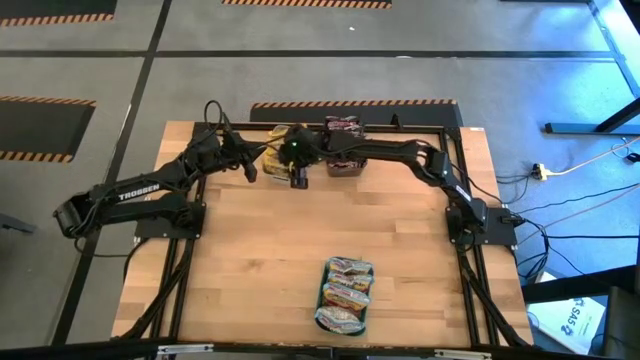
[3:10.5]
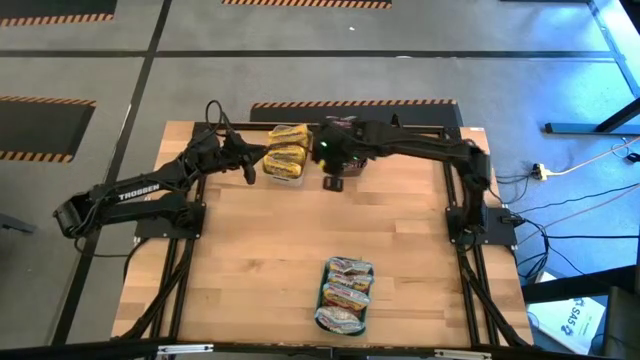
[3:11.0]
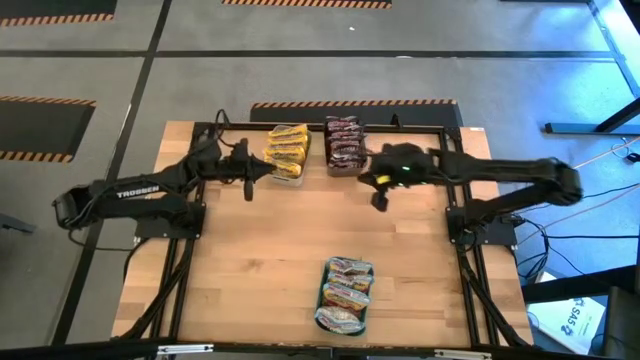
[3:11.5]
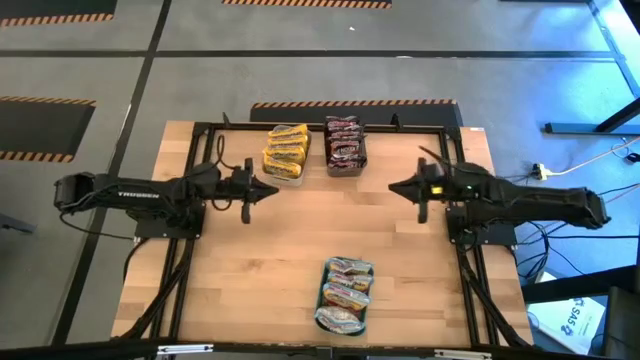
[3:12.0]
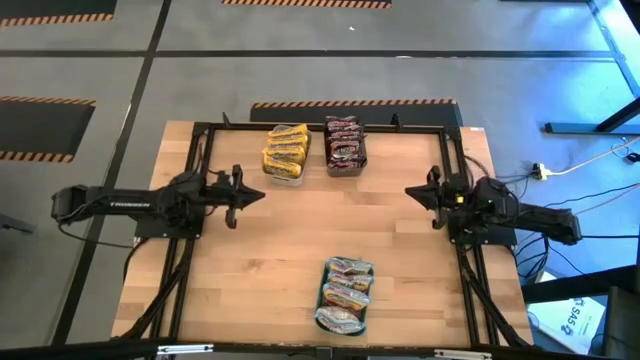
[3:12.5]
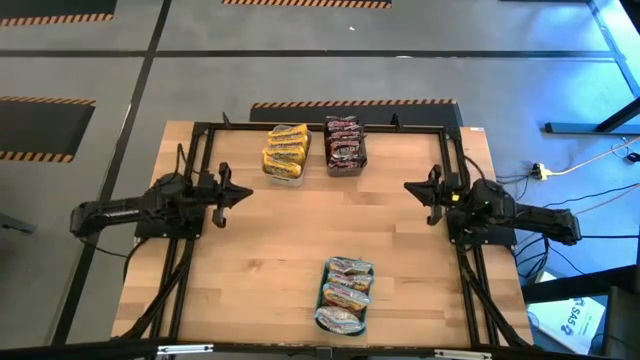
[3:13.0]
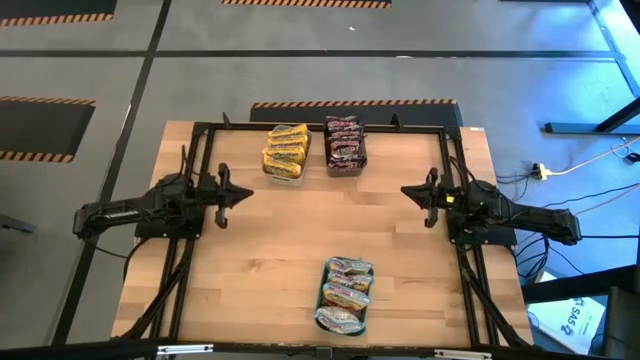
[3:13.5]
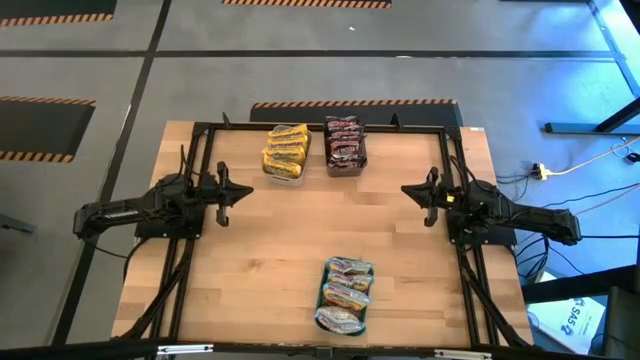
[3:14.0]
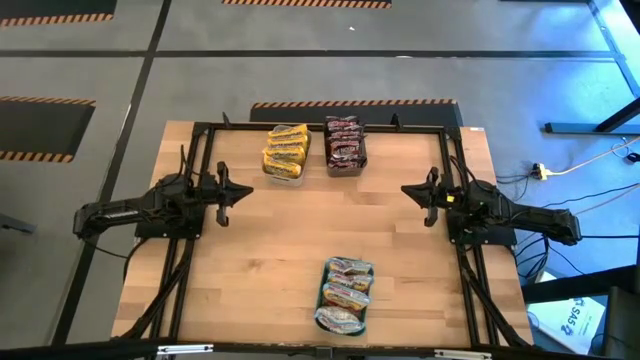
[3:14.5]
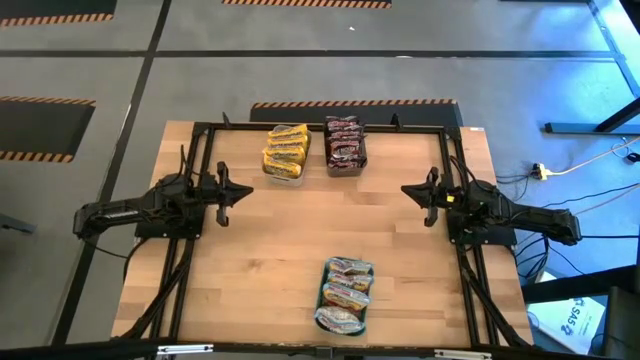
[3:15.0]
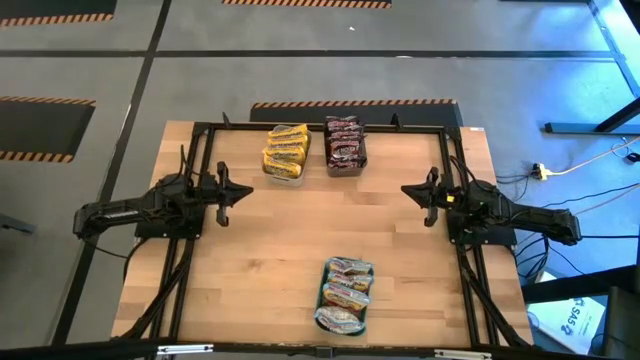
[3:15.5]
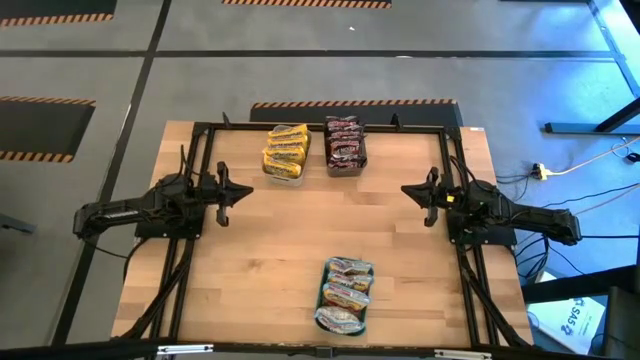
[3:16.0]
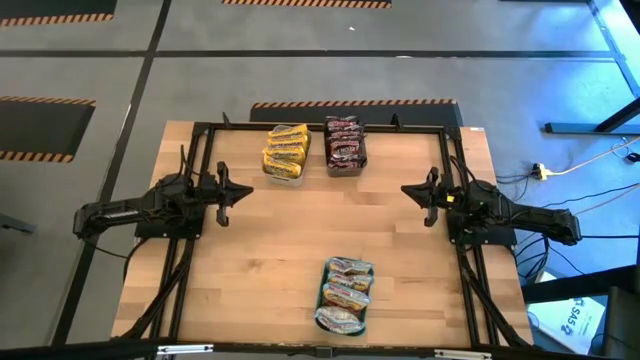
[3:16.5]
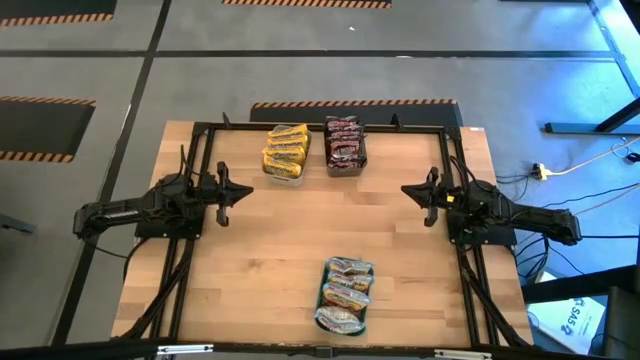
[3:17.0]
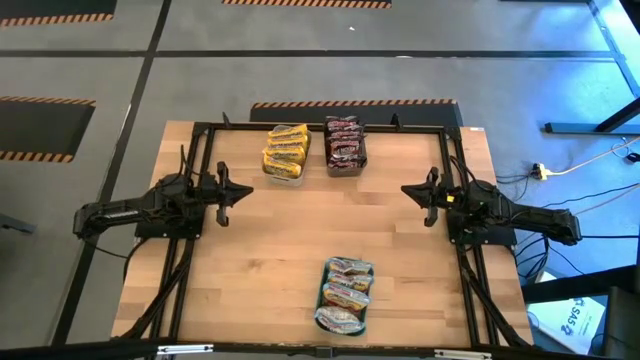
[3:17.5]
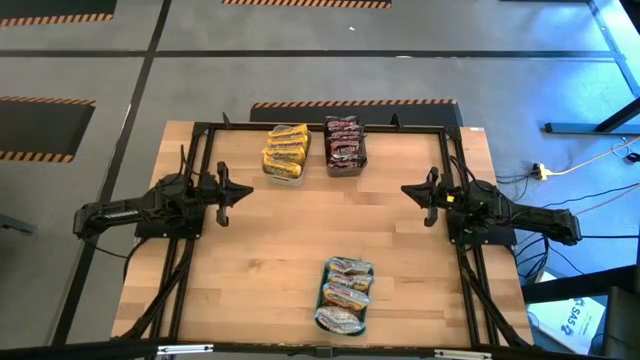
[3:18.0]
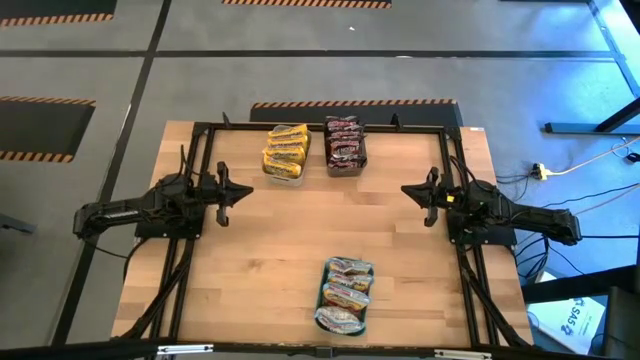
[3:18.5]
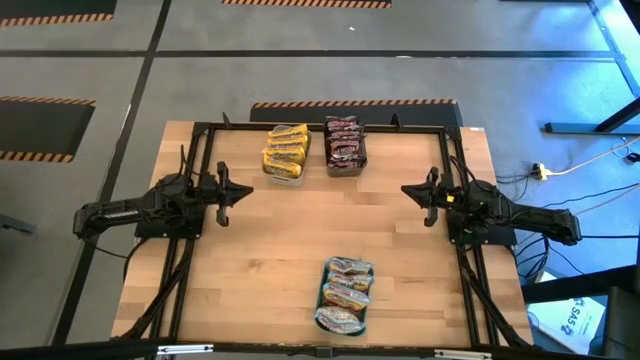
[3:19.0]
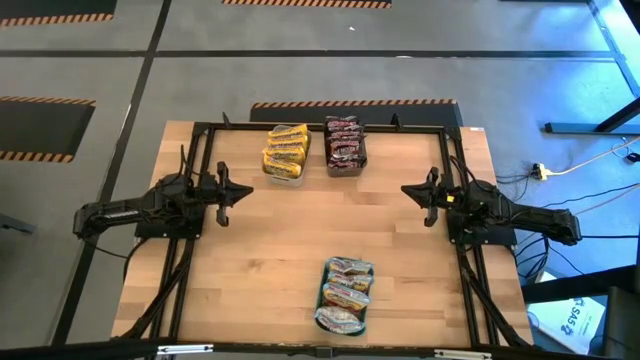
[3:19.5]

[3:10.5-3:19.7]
Task: Sort Maruchan noodles
Return to Home Position
